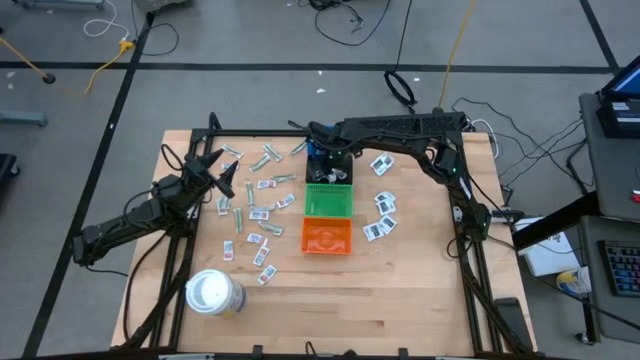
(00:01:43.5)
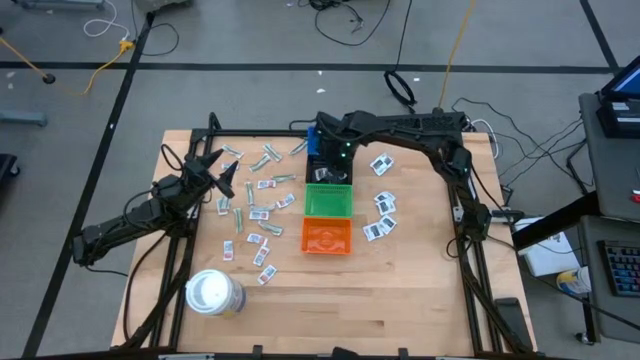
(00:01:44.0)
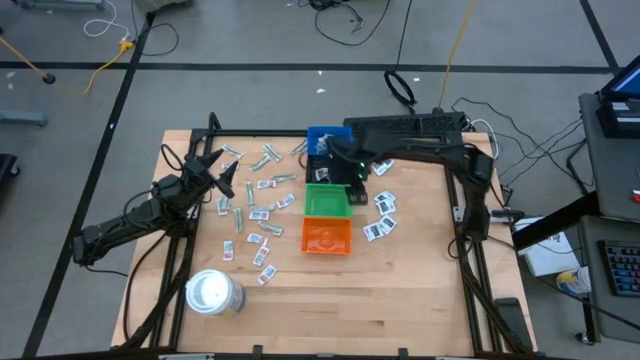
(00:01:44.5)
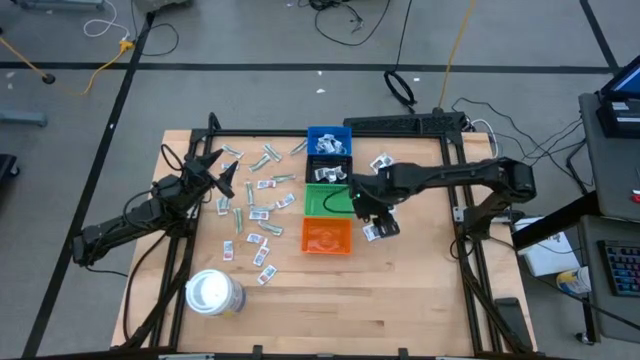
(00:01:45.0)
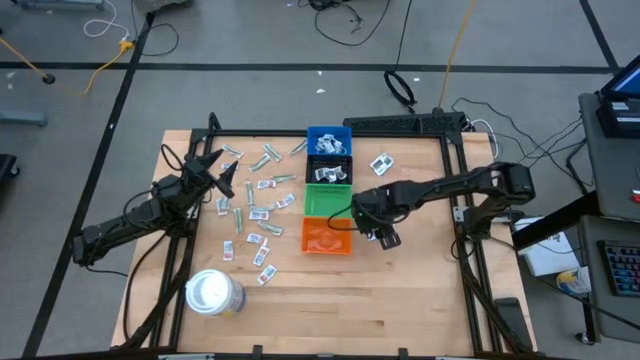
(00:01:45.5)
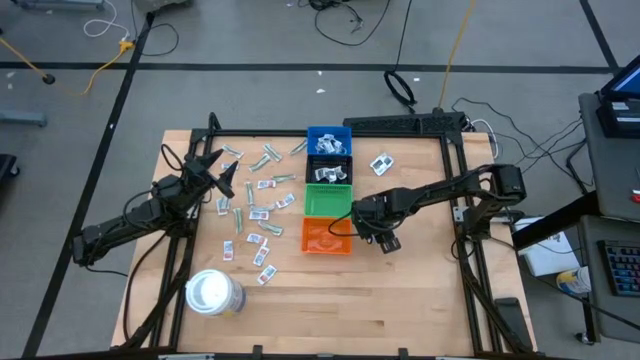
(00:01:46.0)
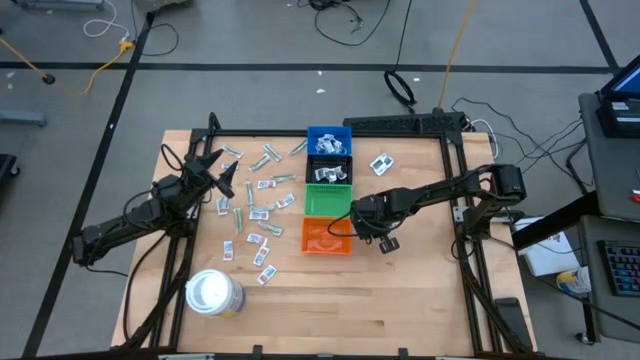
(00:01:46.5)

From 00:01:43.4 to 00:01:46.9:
Task: Pick & Place First Aid Supplies
Put the black towelette pack into the black bin

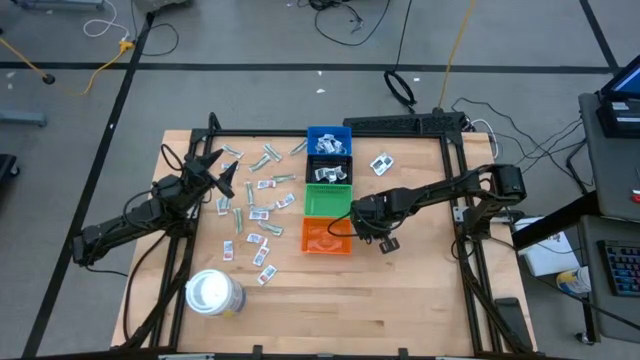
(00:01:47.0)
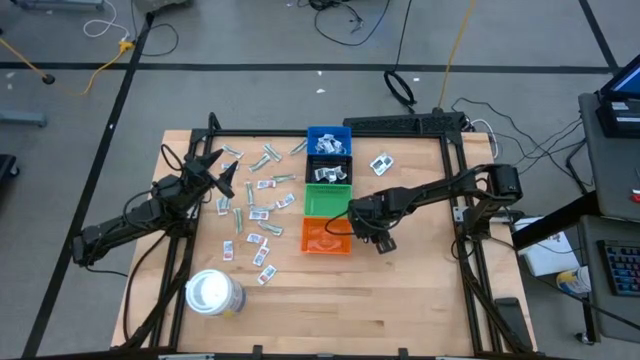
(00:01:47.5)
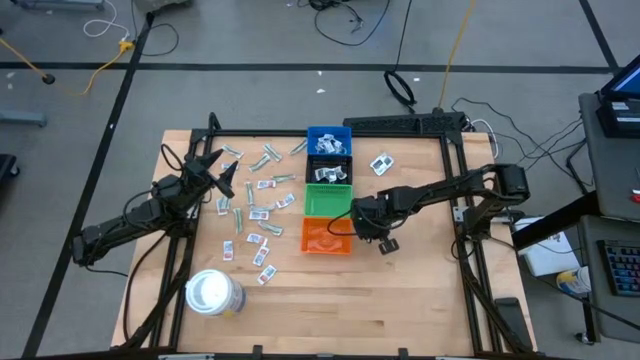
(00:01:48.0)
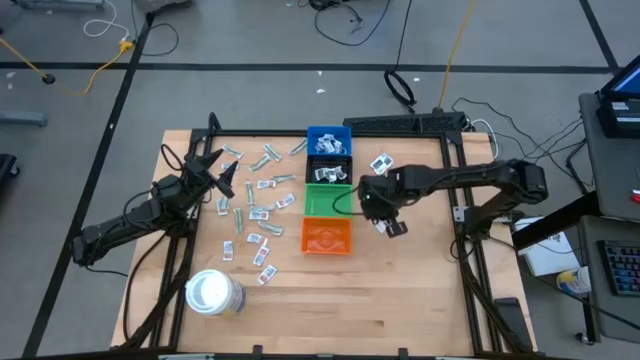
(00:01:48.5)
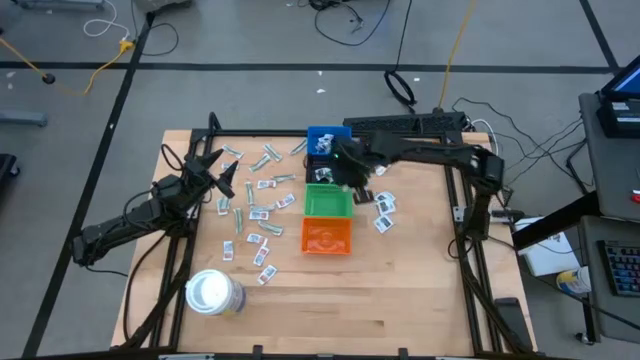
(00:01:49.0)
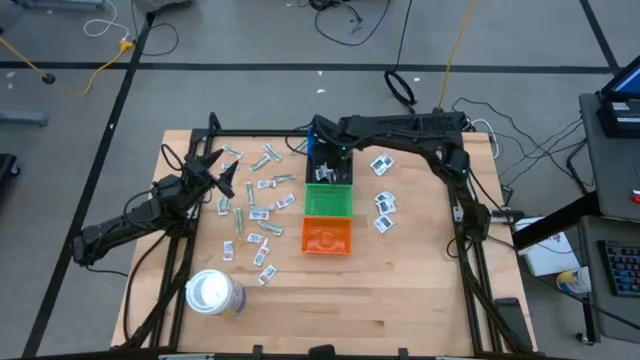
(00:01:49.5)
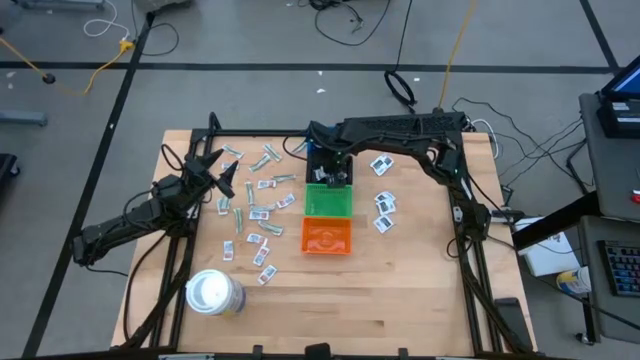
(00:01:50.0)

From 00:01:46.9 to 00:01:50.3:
Put the black towelette pack into the black bin

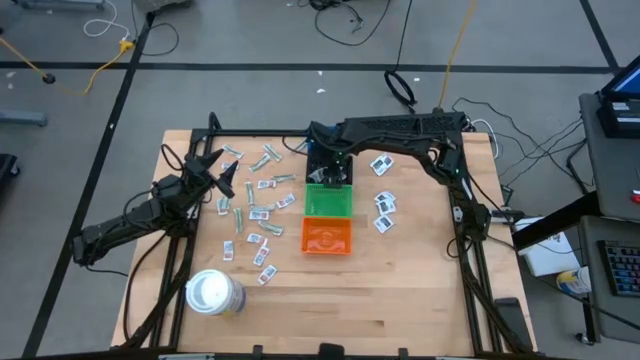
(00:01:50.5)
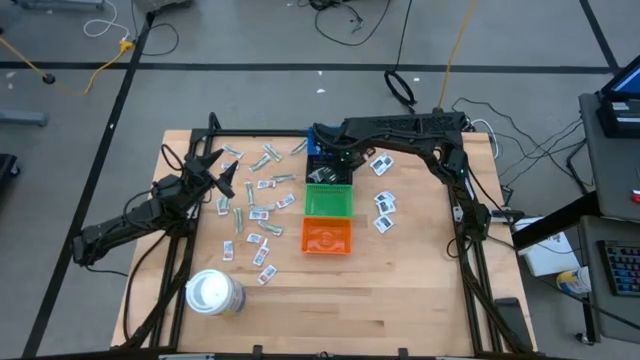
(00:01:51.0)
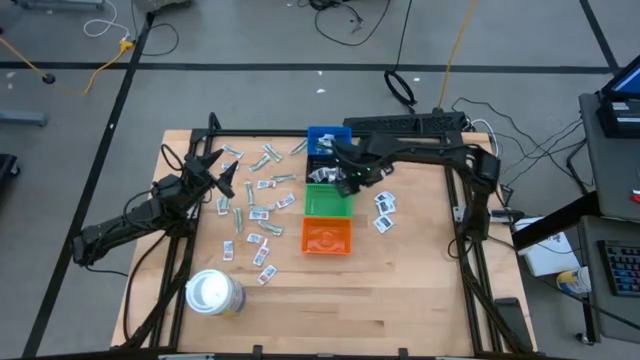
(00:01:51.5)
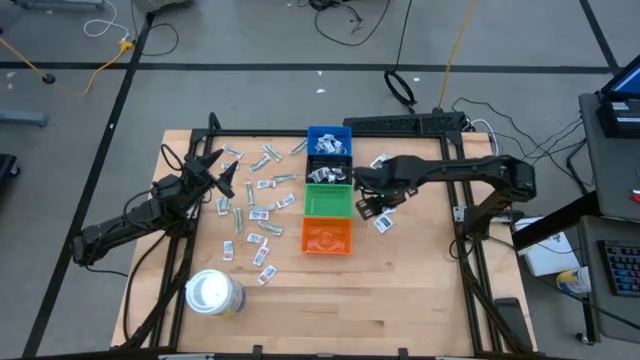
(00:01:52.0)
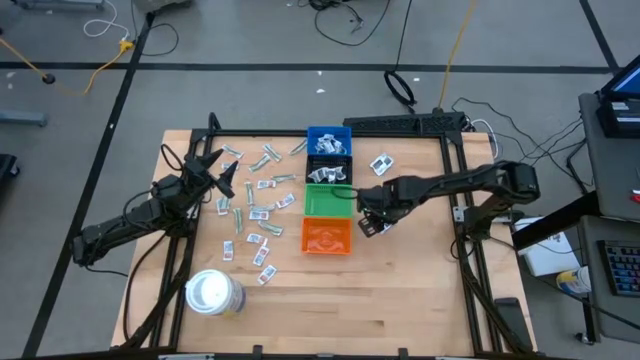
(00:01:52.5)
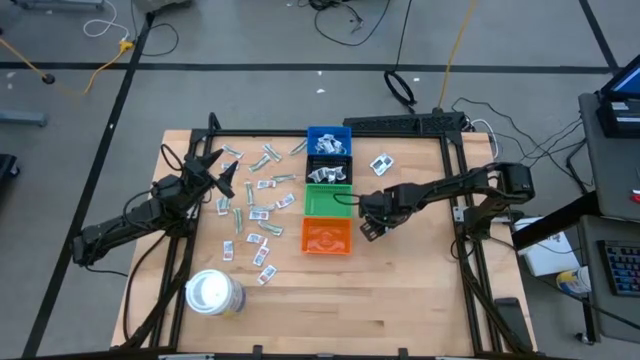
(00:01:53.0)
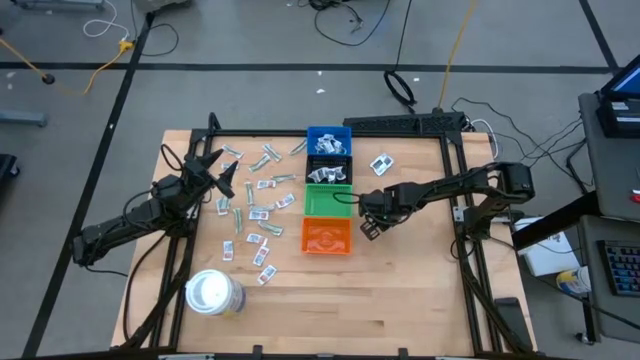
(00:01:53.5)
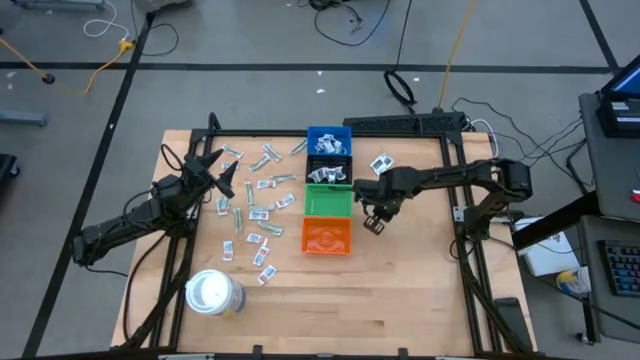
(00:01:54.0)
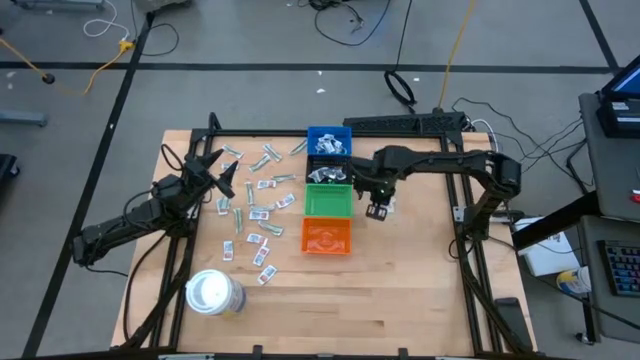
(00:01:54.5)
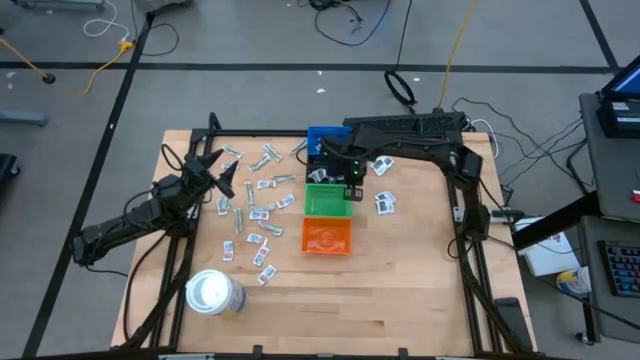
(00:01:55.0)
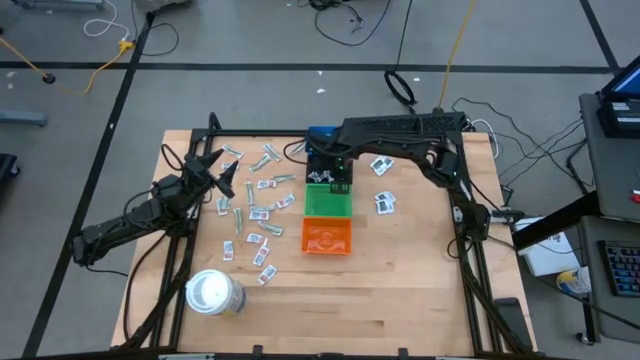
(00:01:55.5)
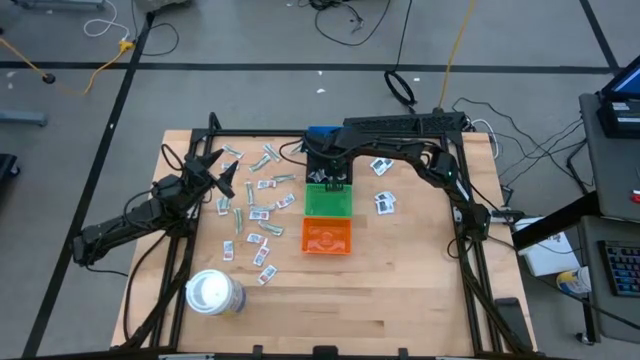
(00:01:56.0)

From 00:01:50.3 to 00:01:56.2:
Put the black towelette pack into the black bin

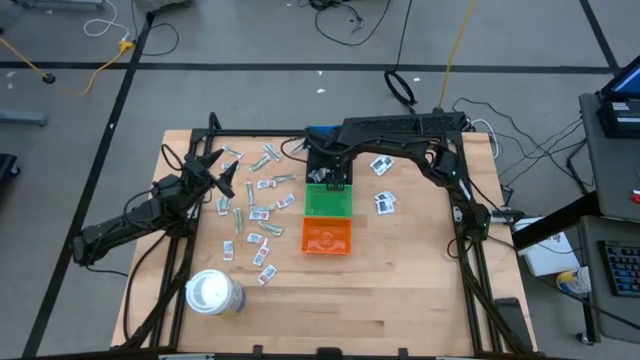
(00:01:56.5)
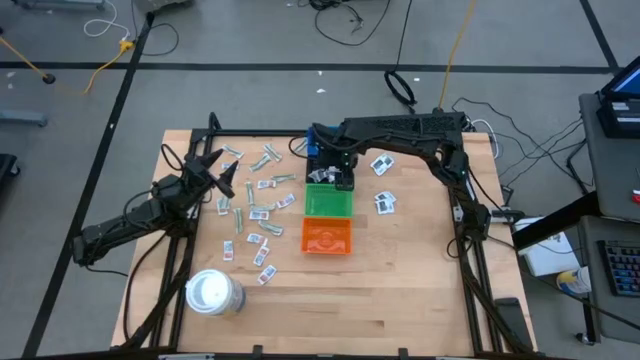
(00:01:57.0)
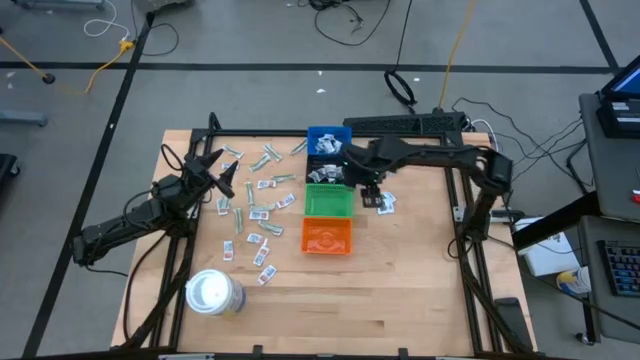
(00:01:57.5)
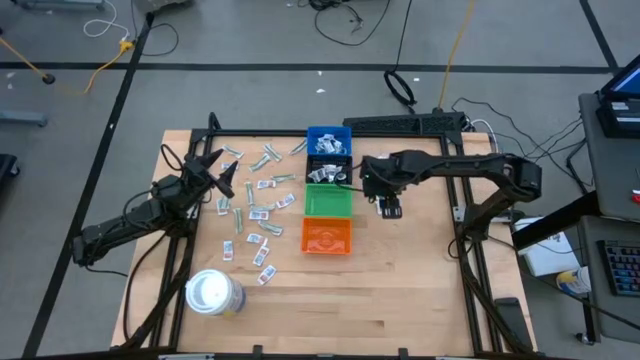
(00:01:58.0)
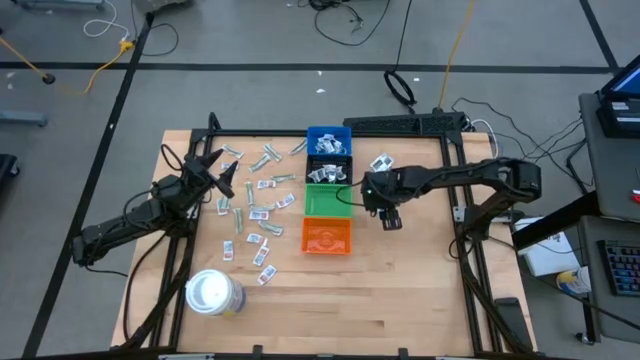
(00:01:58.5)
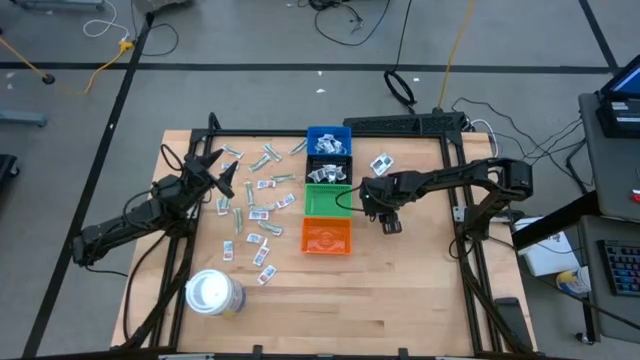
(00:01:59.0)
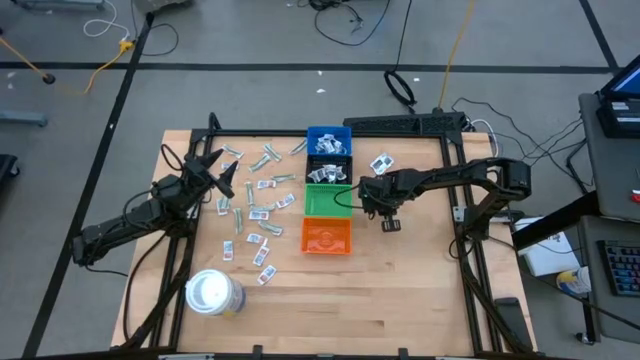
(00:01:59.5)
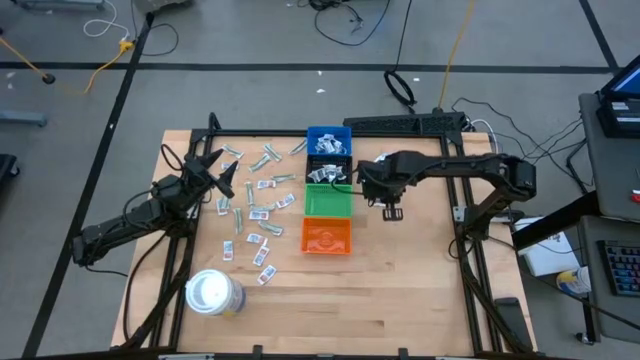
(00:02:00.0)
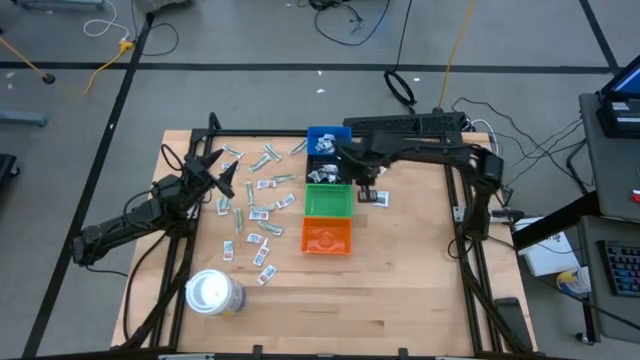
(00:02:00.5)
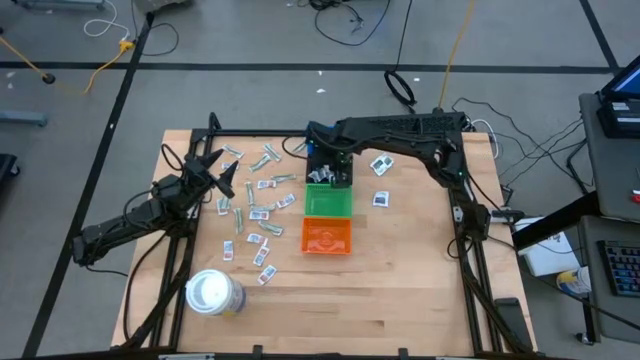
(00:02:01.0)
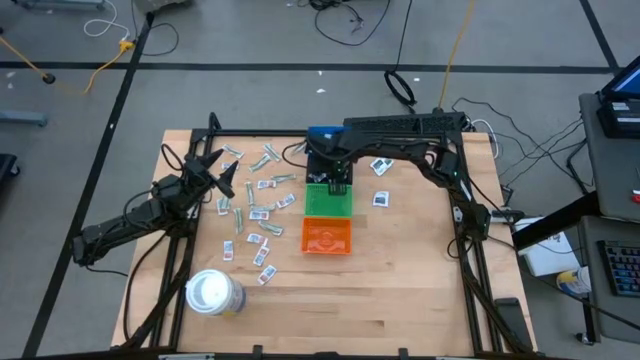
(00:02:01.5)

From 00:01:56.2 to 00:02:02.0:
Put the black towelette pack into the black bin

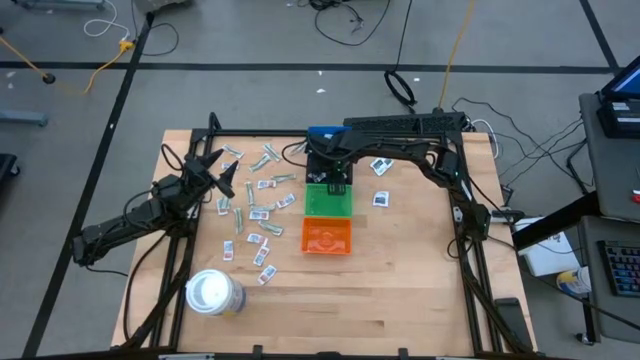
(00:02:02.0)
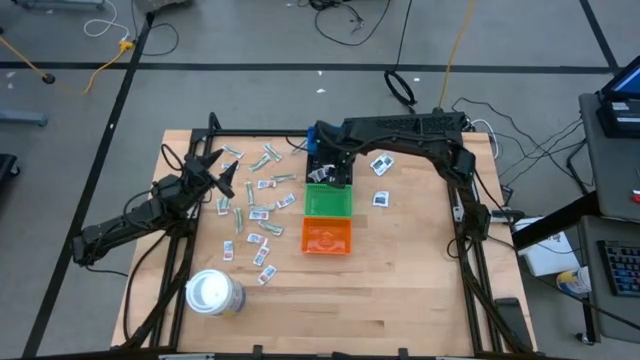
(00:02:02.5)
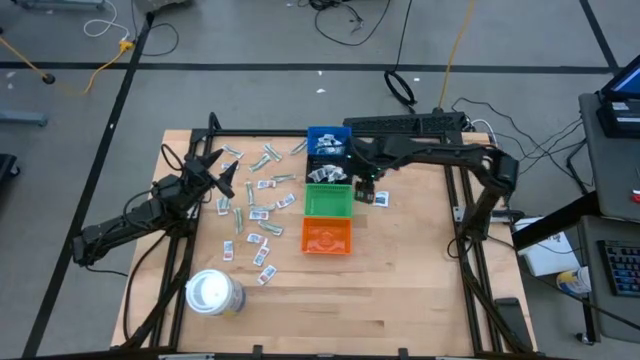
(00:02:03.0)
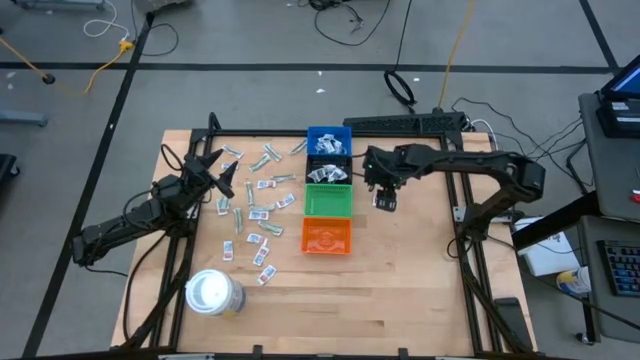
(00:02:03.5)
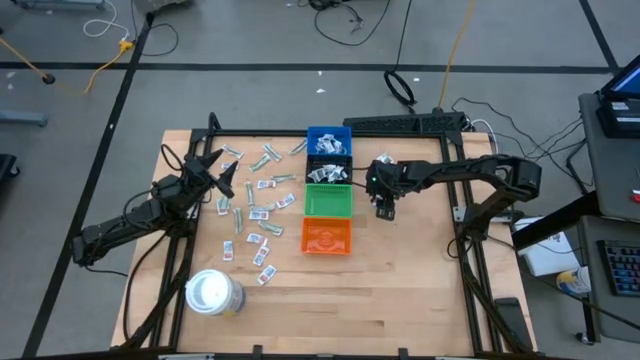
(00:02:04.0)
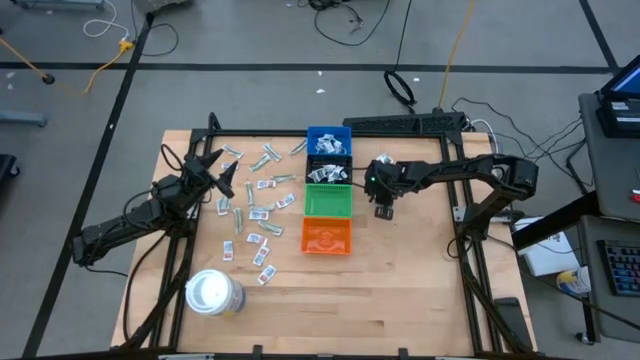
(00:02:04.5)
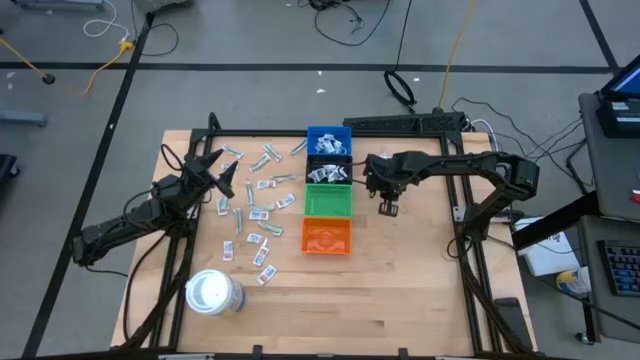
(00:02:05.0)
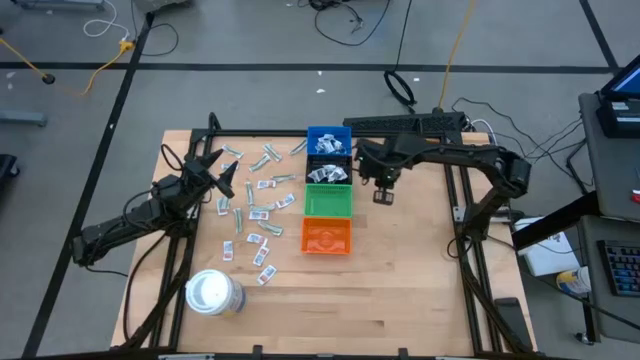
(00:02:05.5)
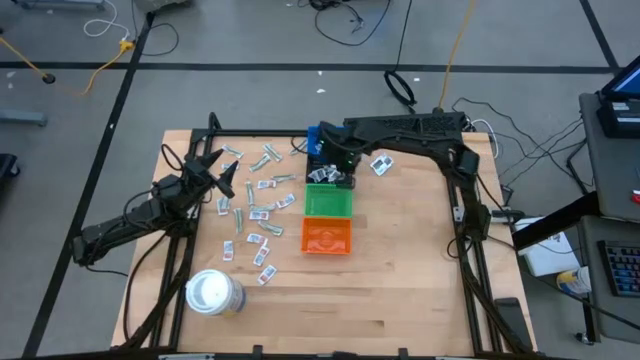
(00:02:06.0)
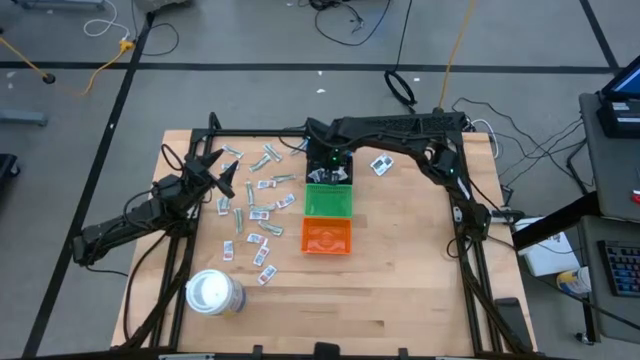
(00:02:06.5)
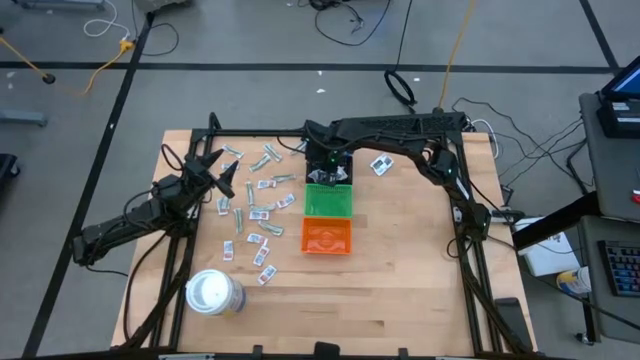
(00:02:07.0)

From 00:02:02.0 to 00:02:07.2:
Put the black towelette pack into the black bin
